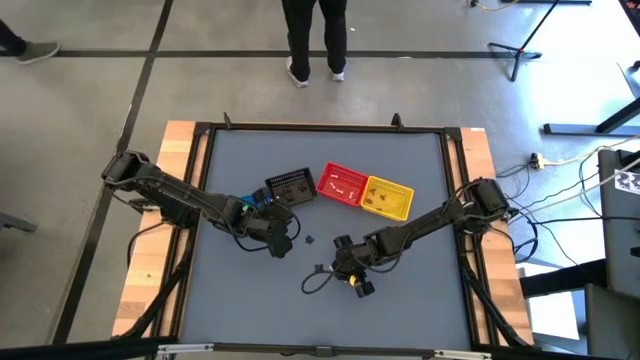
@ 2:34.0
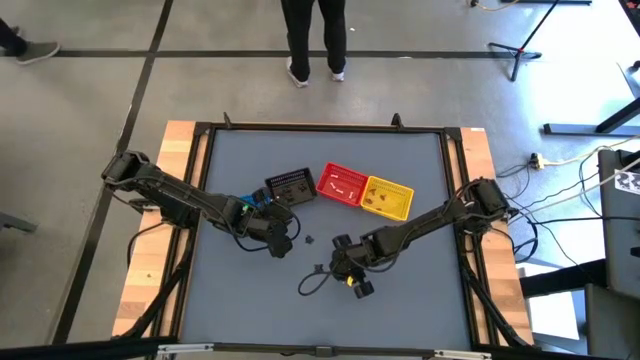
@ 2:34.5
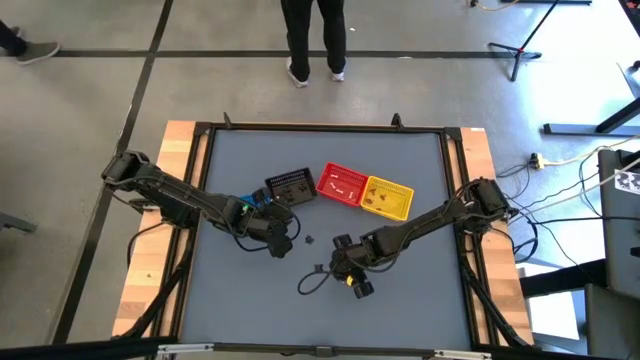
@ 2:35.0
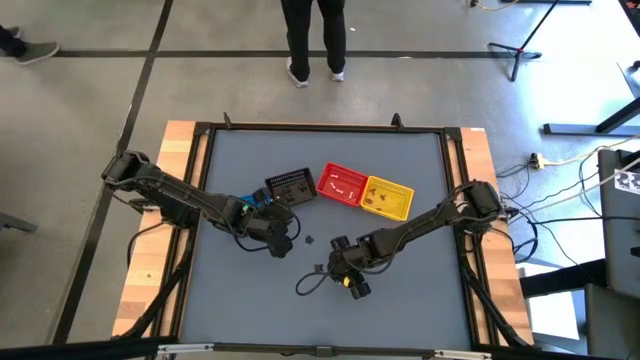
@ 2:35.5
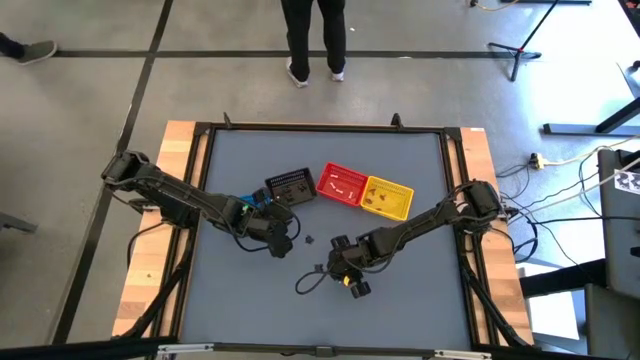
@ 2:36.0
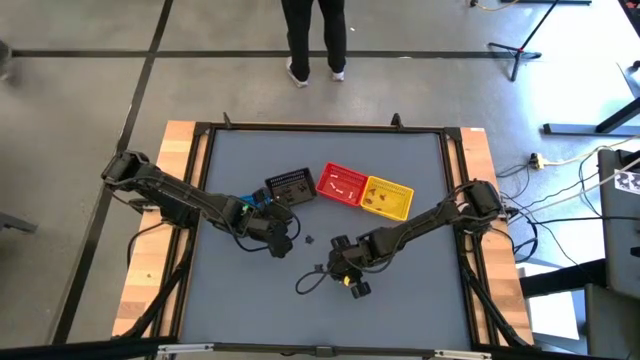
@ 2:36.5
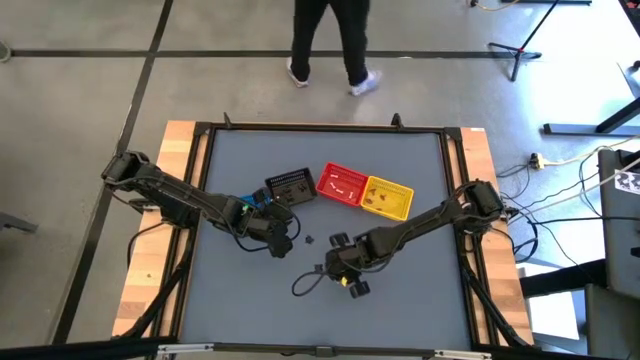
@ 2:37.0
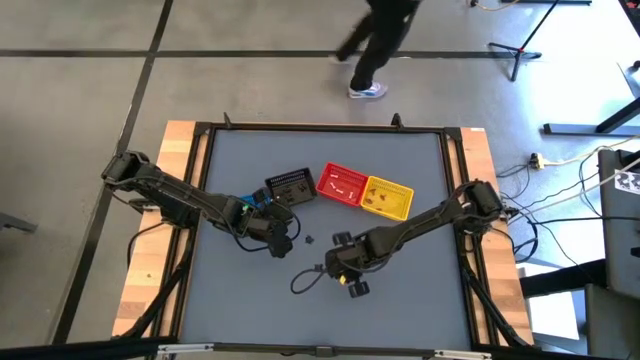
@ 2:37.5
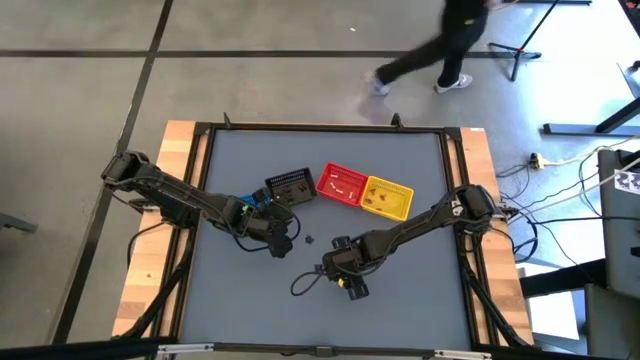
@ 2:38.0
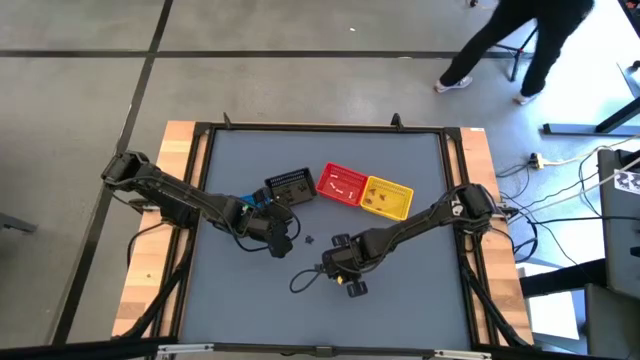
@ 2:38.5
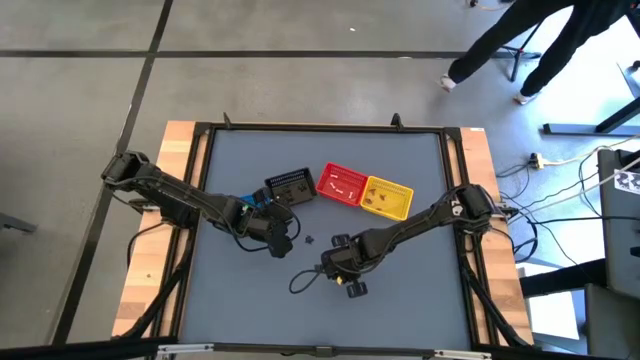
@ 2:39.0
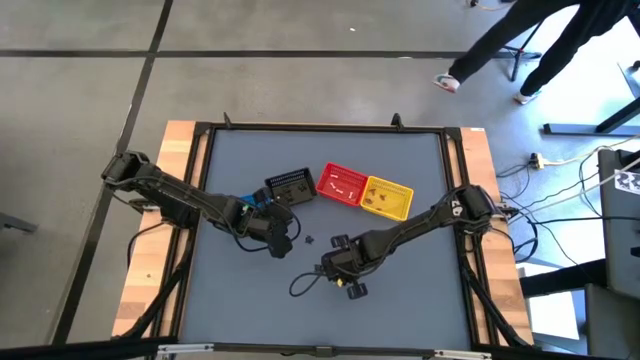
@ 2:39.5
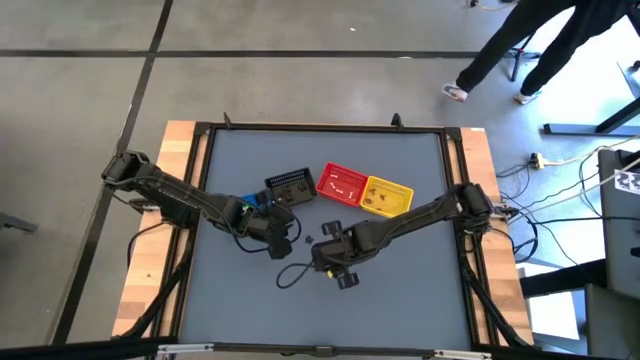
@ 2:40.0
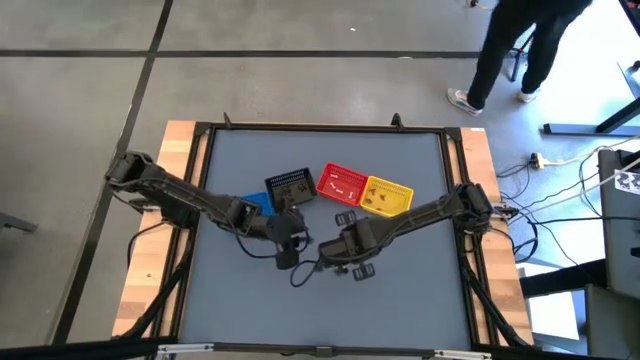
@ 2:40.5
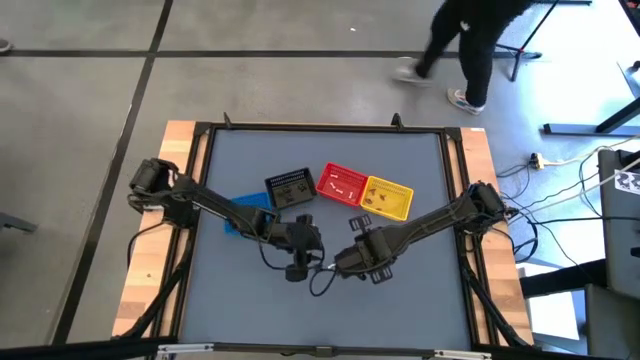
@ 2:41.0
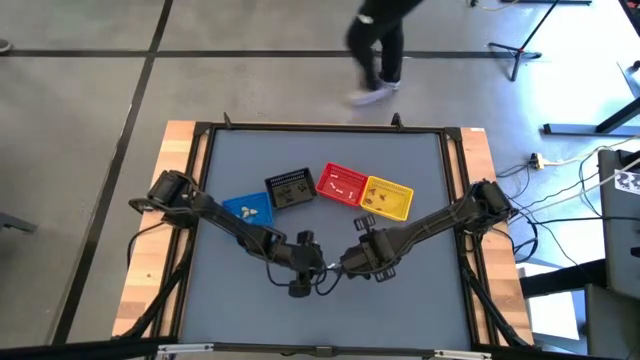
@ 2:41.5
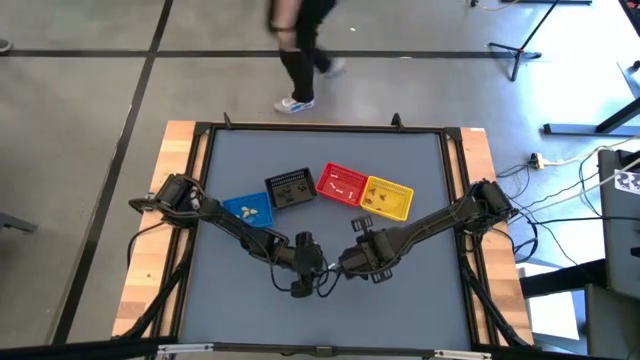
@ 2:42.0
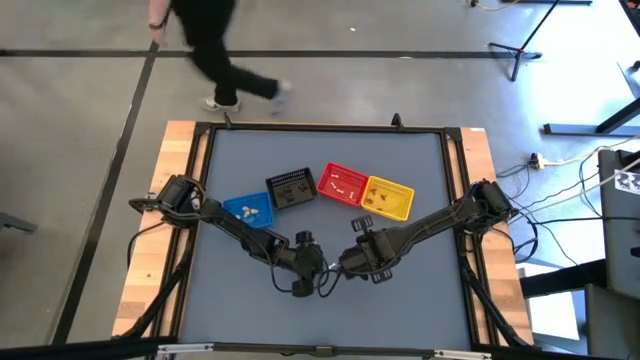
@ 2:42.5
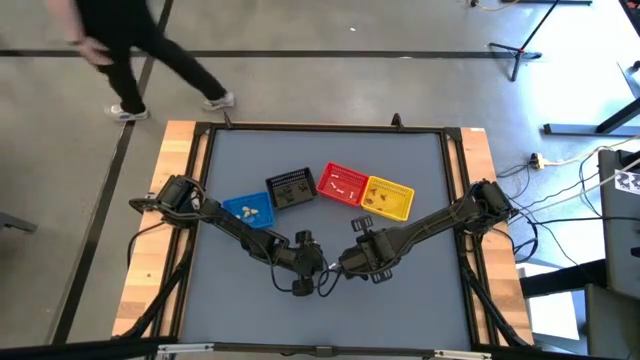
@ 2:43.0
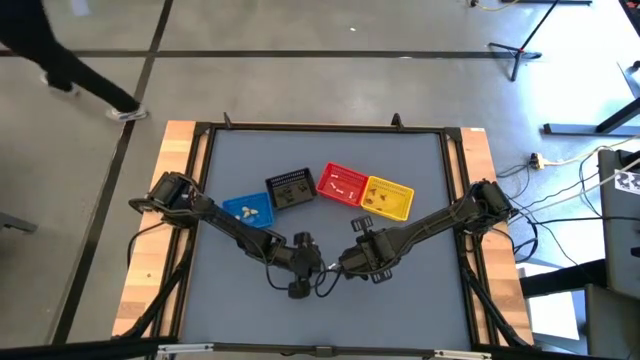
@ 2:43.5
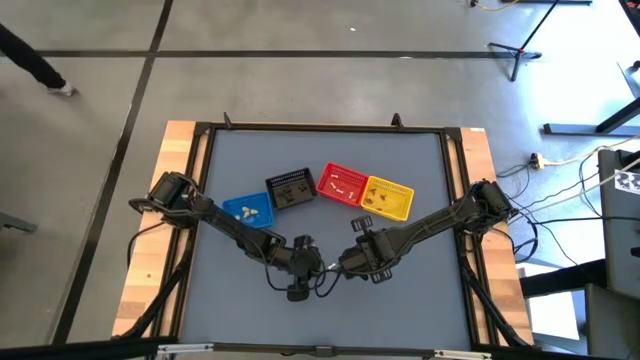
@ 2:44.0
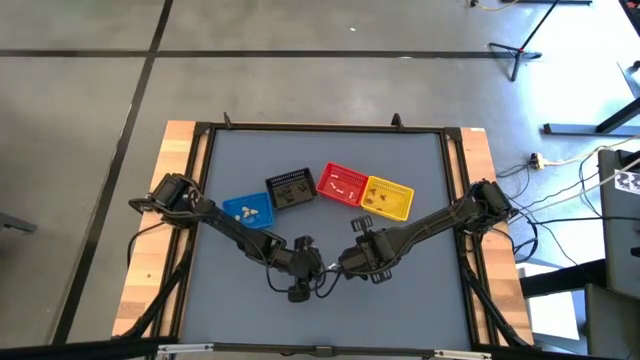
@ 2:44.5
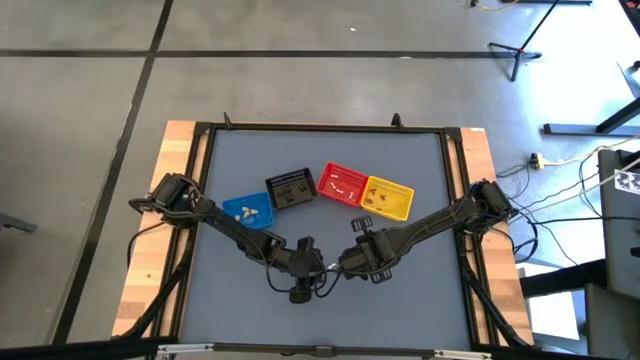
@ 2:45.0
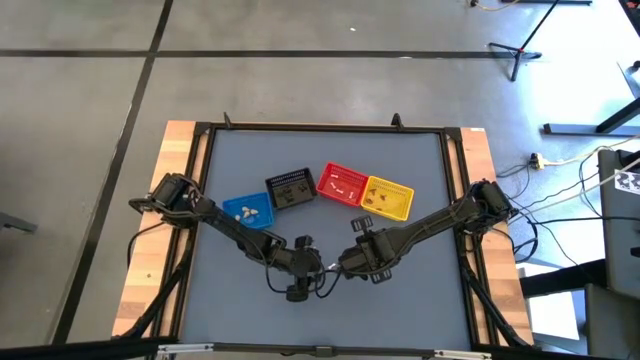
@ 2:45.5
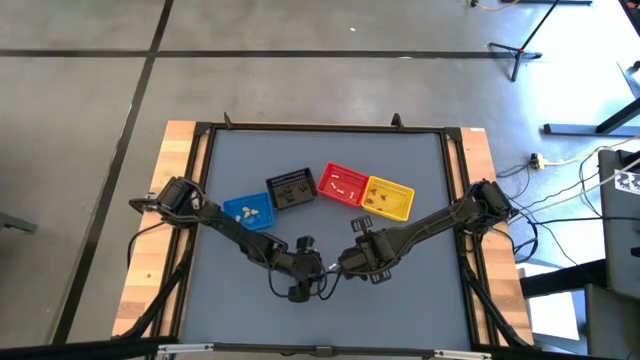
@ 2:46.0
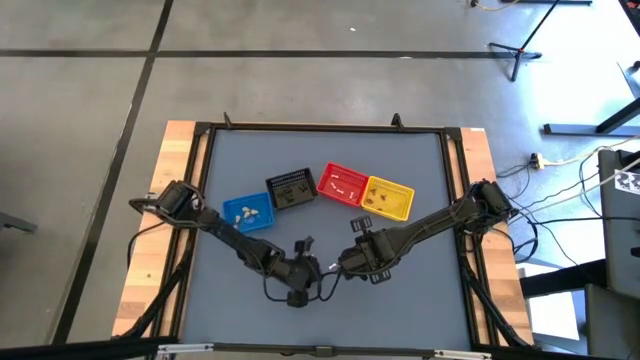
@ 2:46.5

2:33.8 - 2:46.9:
Task: Sort Halloween decoration
Put the black spider toy into the black bin

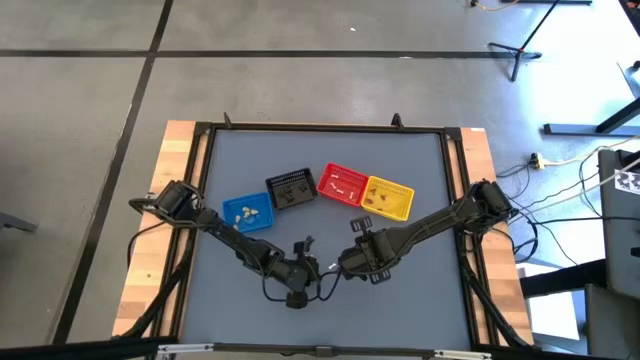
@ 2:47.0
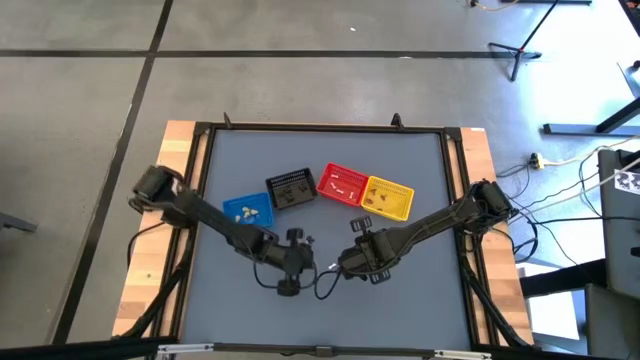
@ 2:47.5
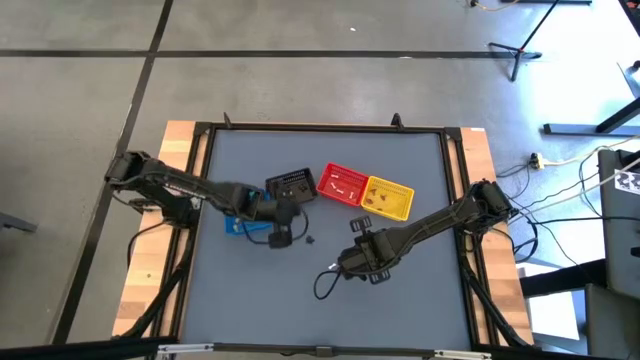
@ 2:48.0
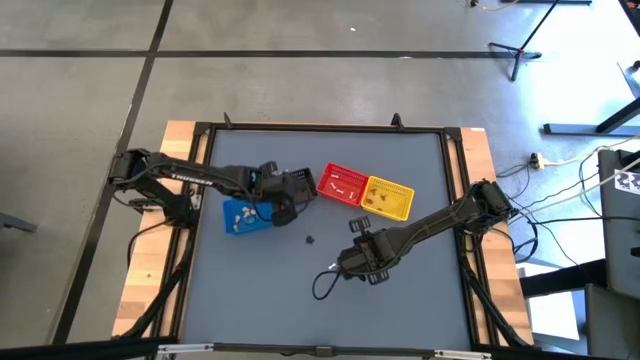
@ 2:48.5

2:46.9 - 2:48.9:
Put the black spider toy into the black bin

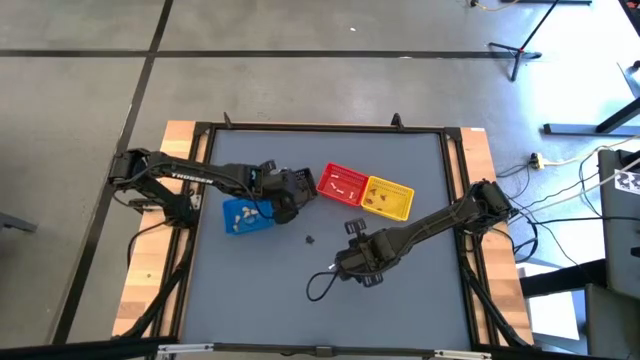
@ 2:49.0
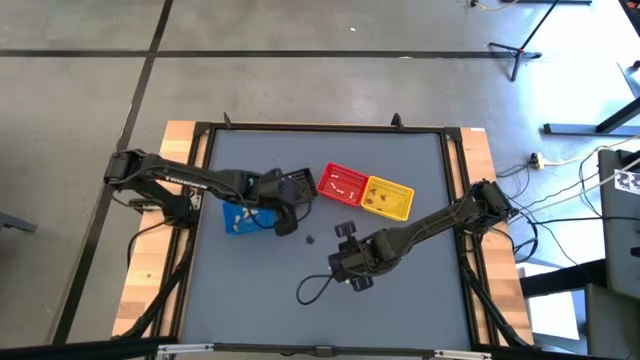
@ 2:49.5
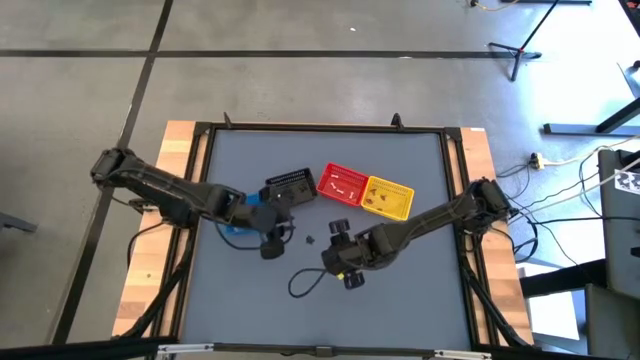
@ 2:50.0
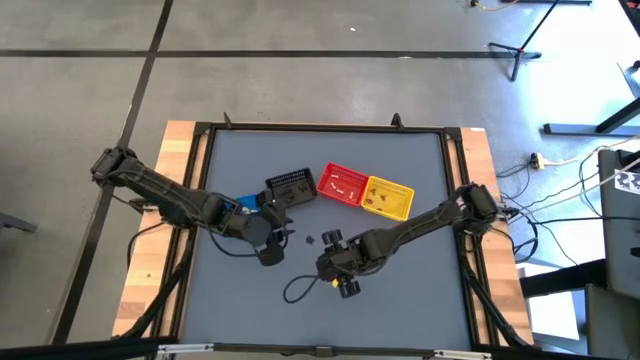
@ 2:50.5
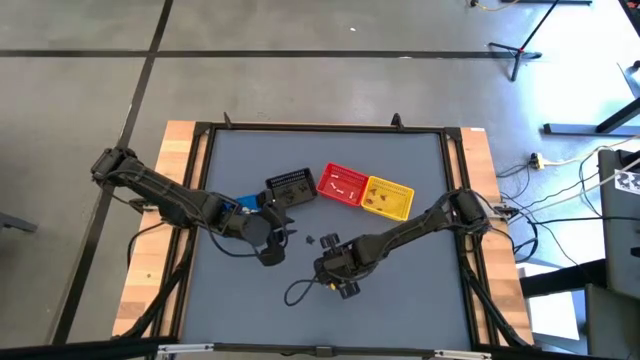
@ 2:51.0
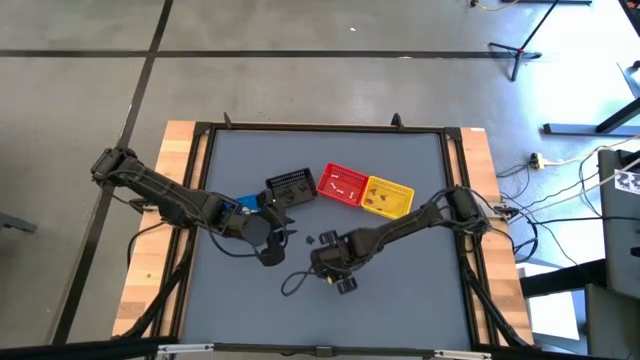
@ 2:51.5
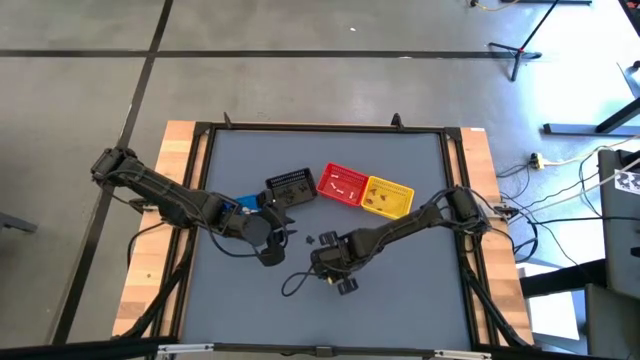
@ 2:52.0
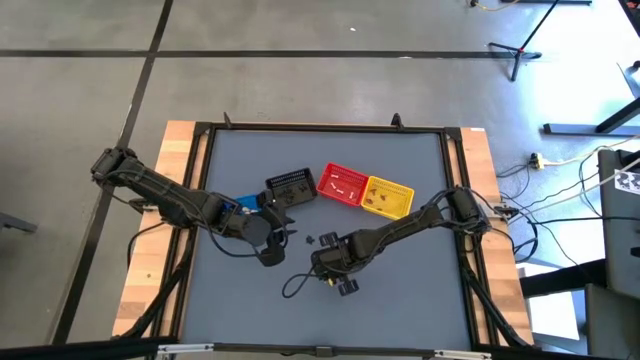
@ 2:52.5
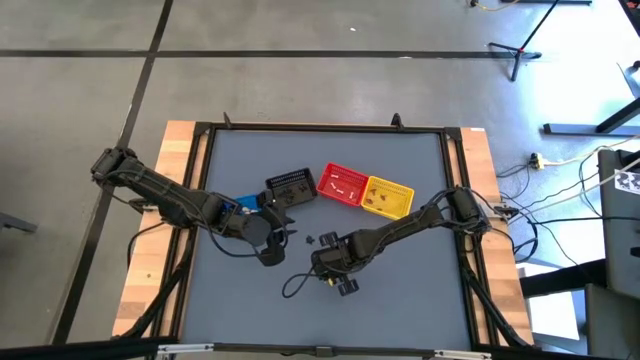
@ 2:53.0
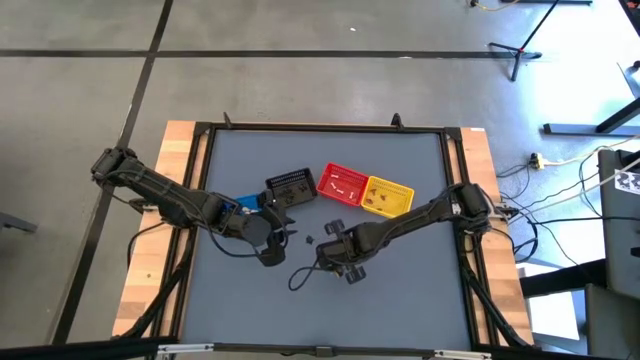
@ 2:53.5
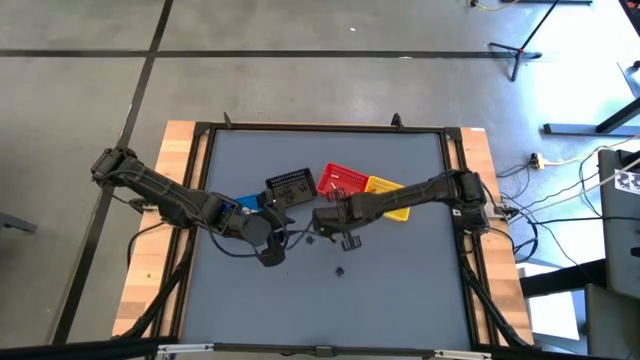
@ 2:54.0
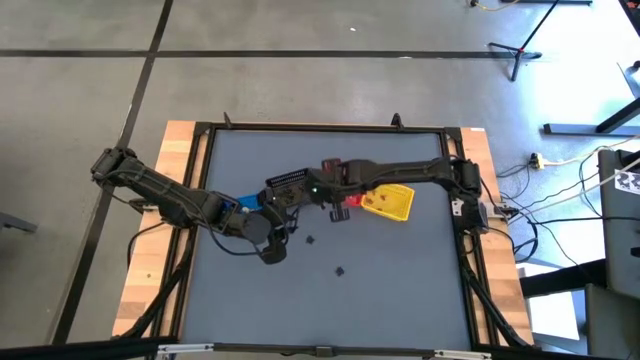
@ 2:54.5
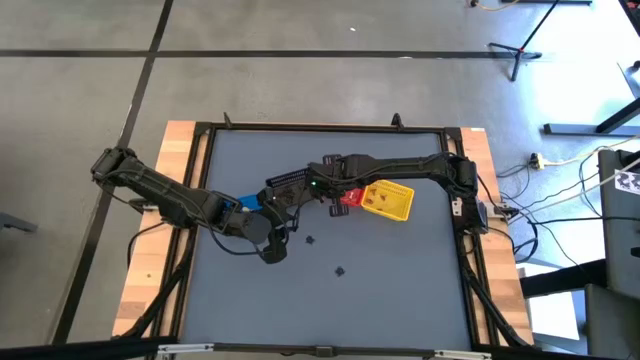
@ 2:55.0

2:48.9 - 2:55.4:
Put the white bone toy into the red bin
